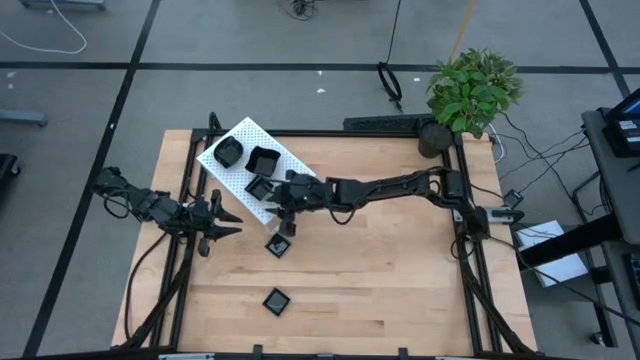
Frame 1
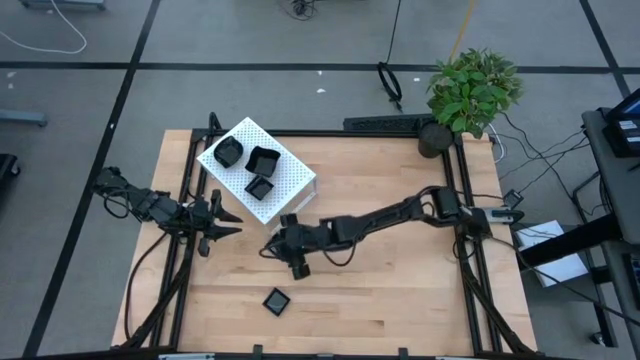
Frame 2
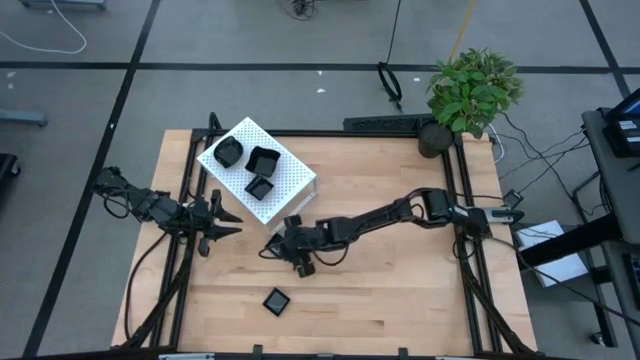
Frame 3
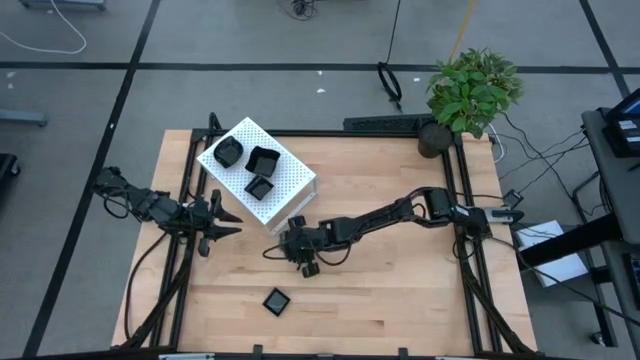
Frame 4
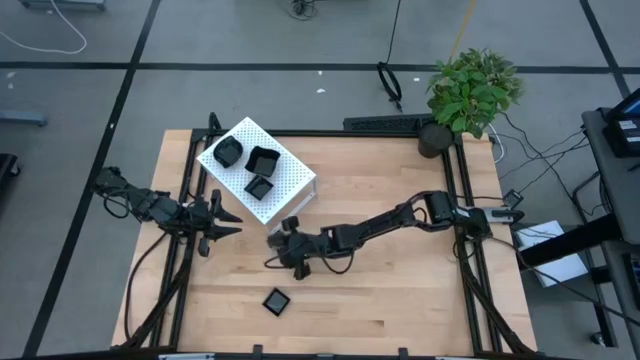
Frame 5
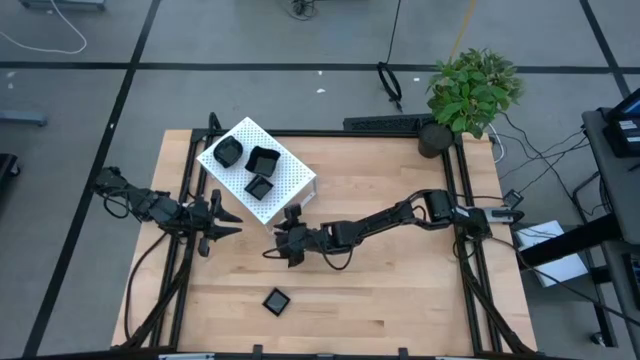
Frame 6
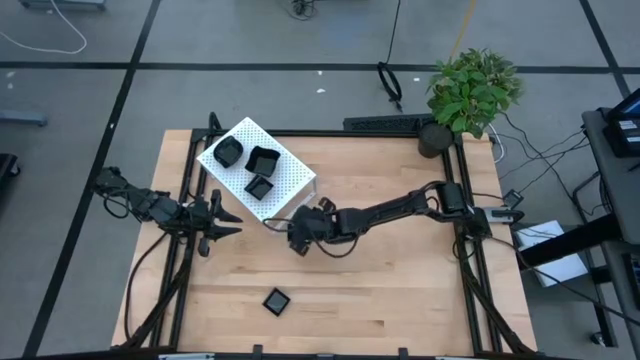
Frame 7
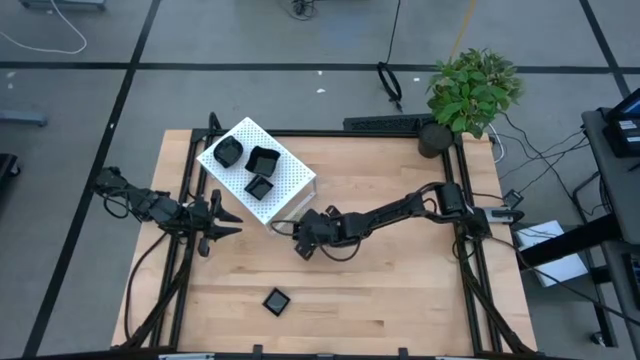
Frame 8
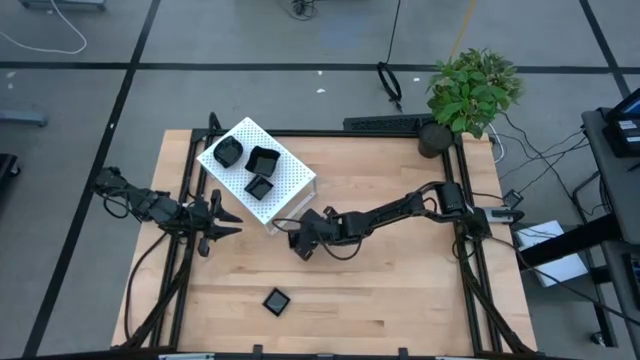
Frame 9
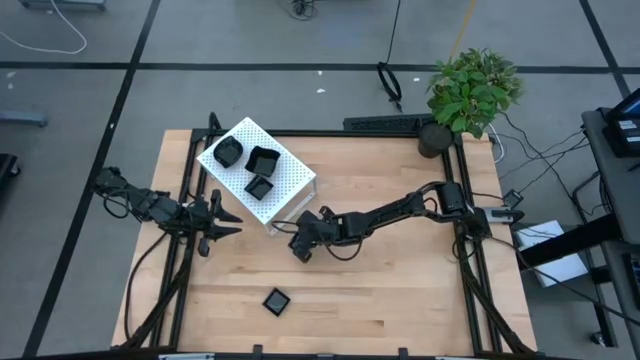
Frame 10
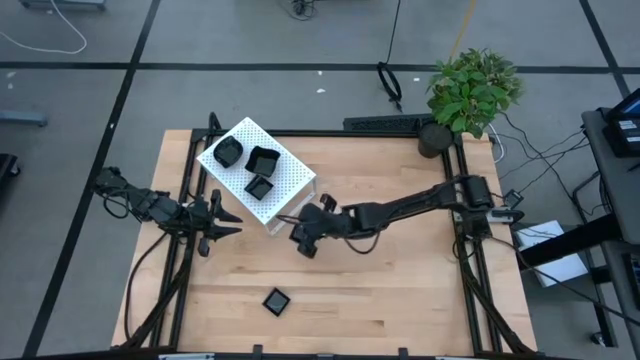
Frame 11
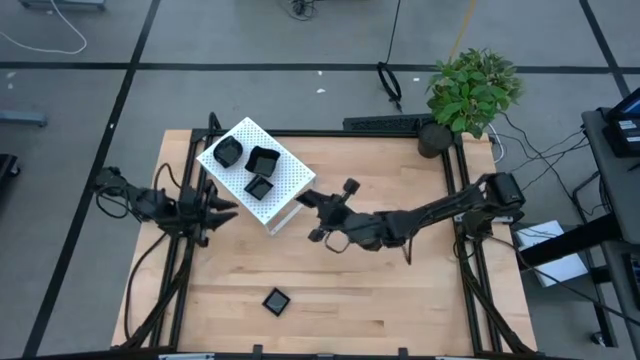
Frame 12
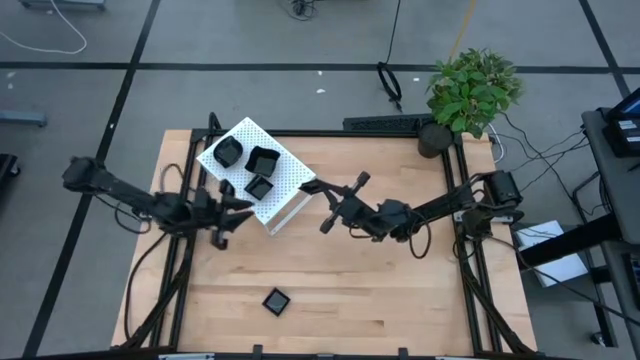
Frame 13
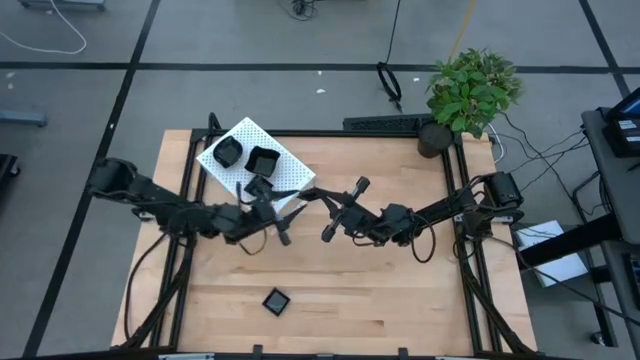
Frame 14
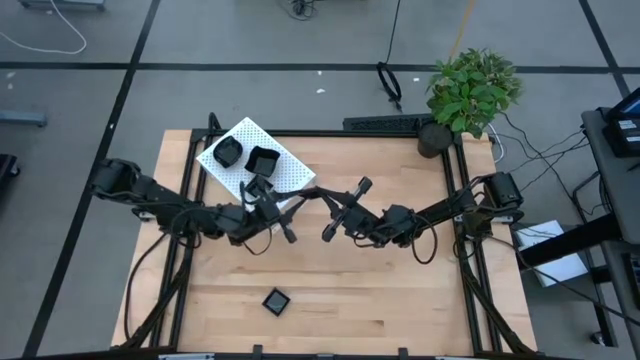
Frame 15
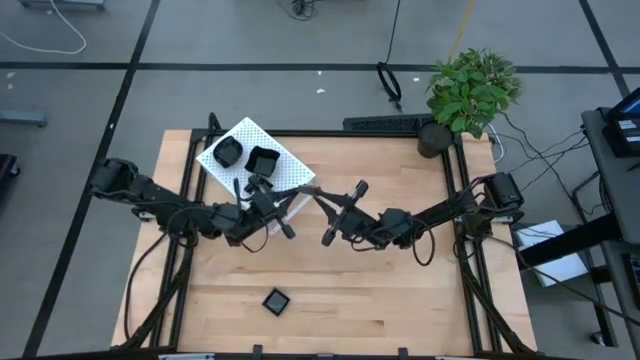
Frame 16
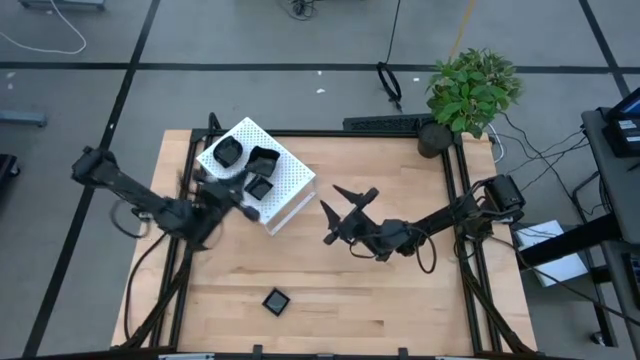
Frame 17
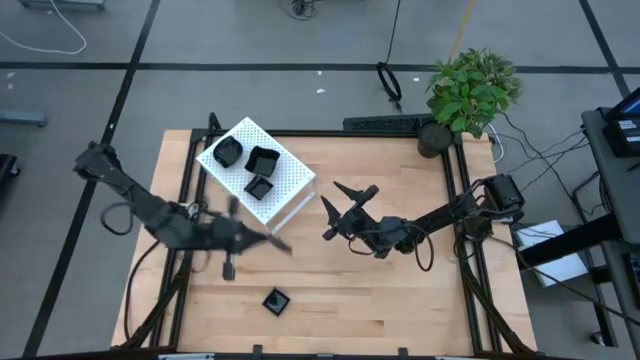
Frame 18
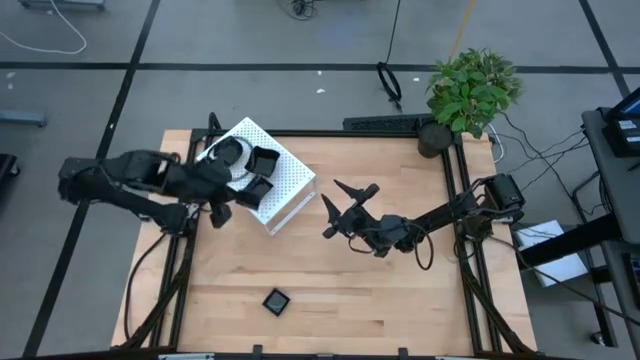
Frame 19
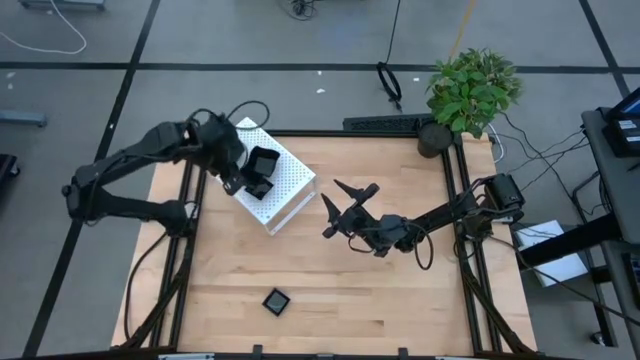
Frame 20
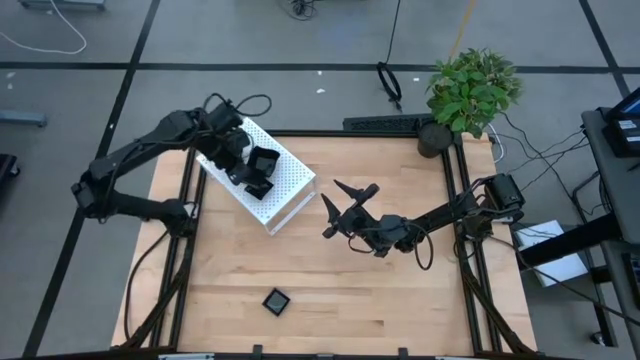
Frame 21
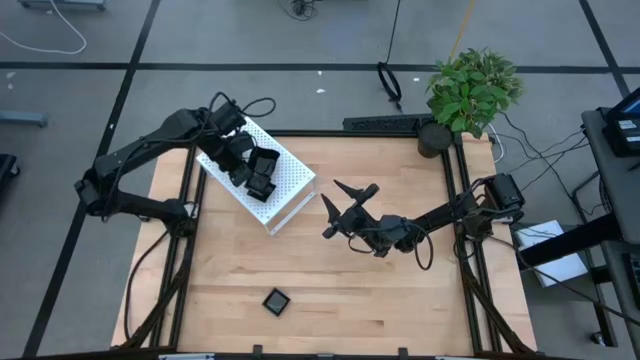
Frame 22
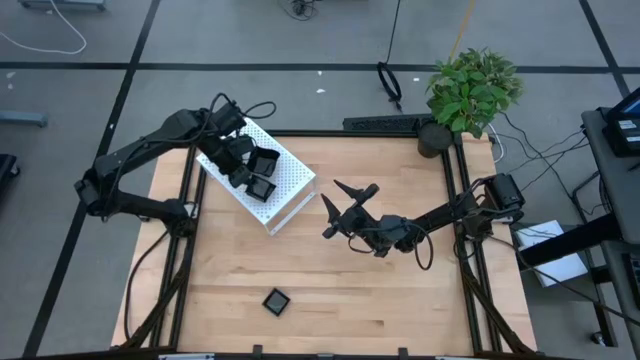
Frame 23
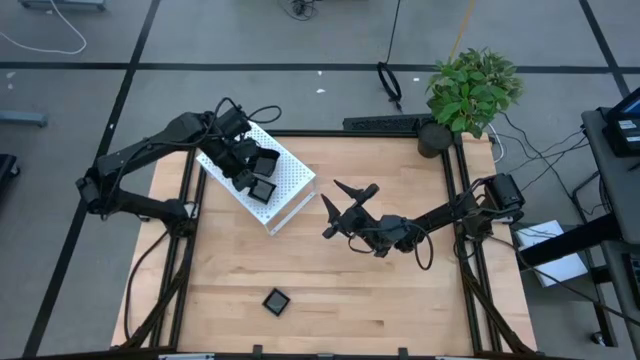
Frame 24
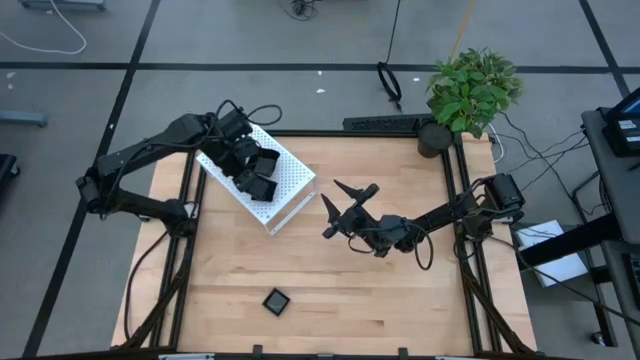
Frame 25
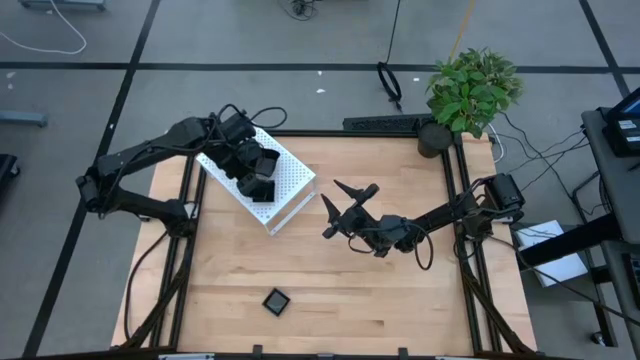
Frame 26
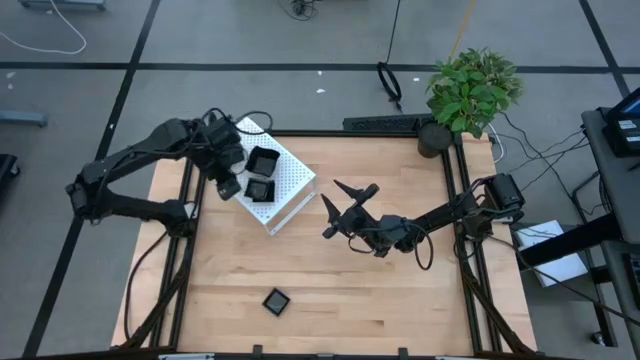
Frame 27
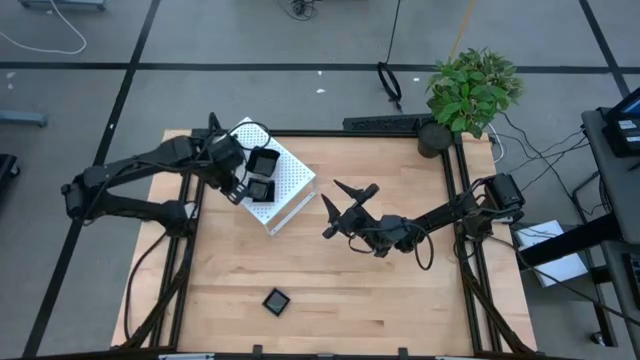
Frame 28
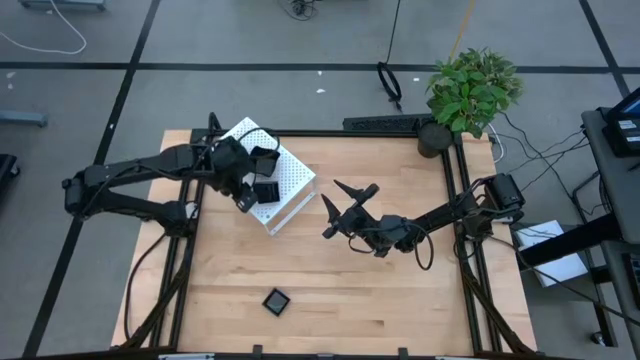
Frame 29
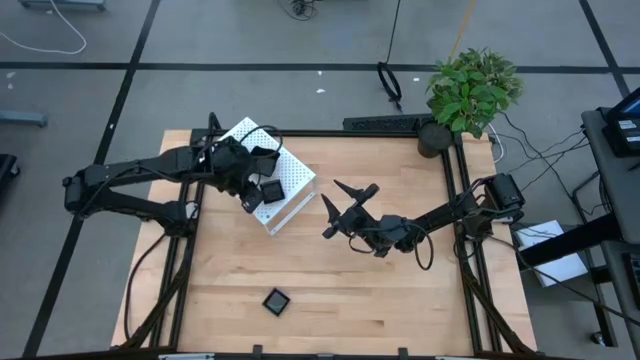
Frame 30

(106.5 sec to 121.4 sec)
Task: Pick & Place Mini shaped plates
Stack the black square plate on top of the black square plate on the shelf

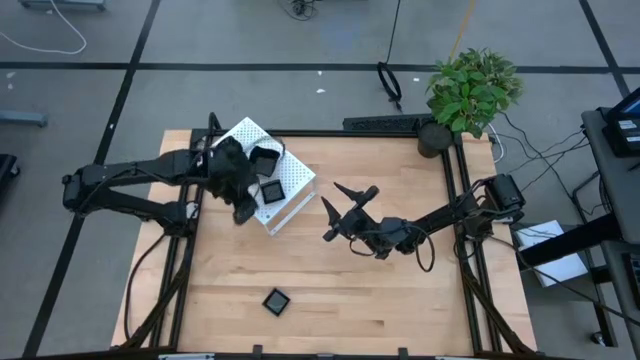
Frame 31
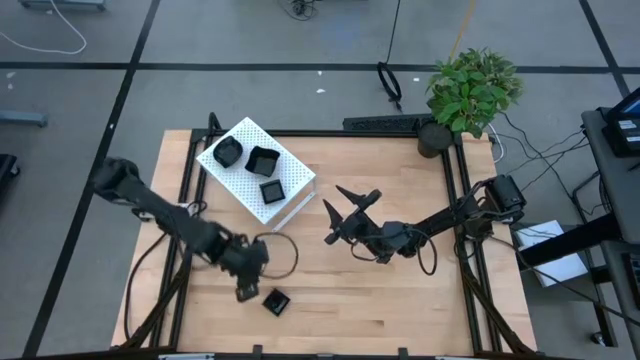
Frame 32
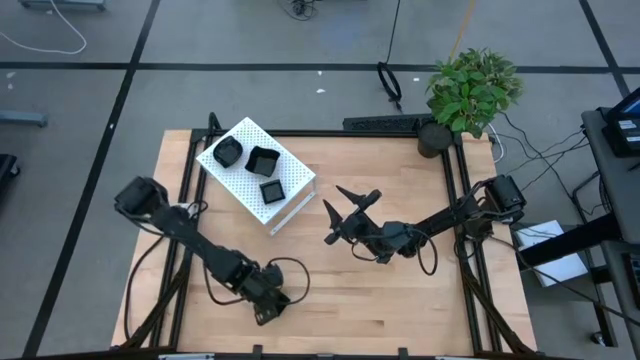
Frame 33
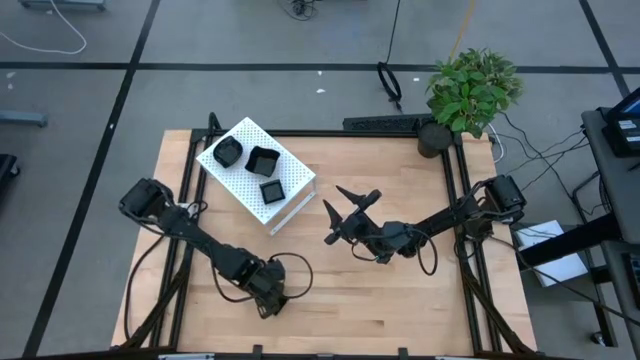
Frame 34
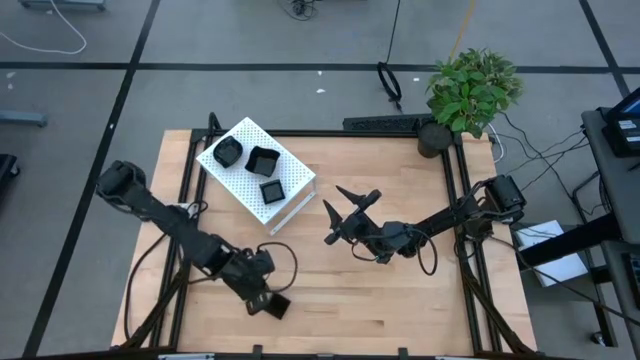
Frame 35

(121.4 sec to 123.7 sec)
Stack the black square plate on top of the black square plate on the shelf

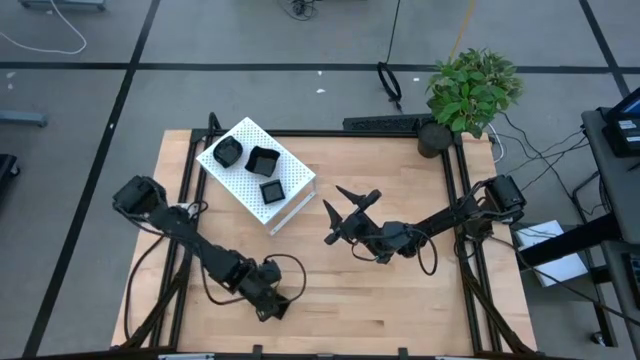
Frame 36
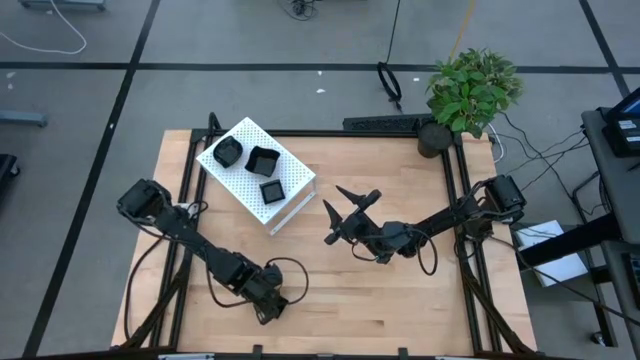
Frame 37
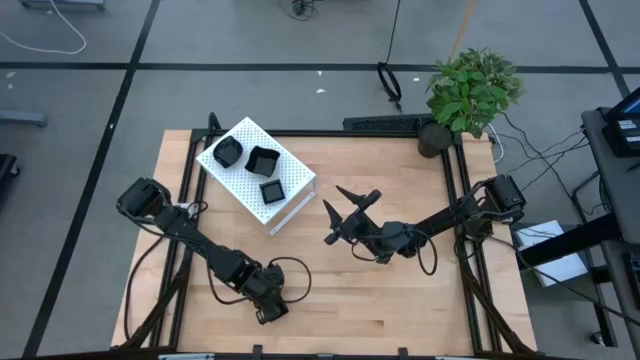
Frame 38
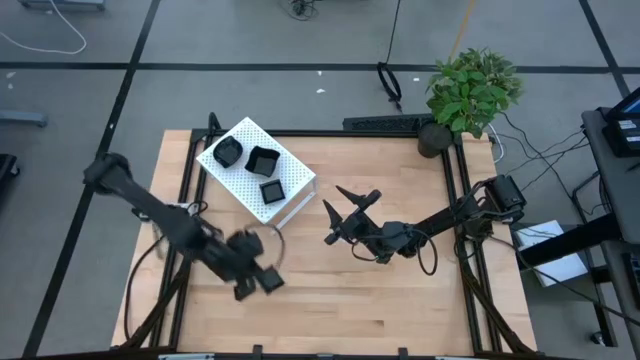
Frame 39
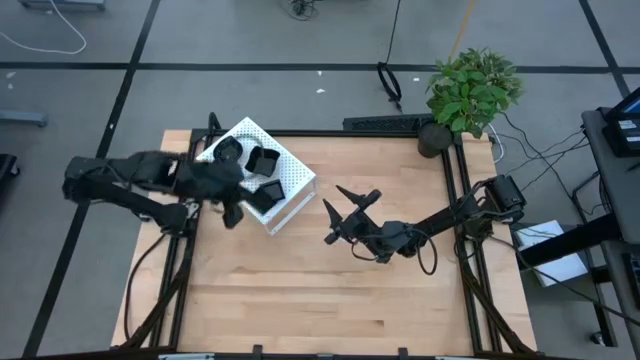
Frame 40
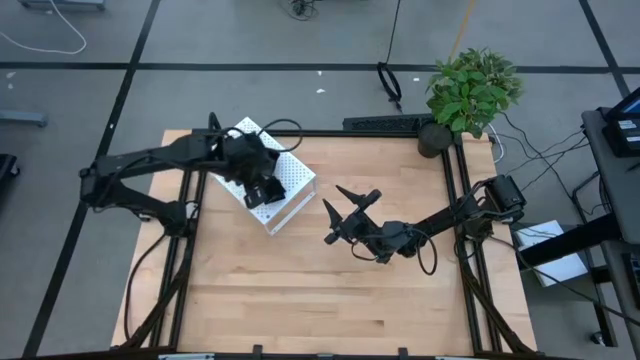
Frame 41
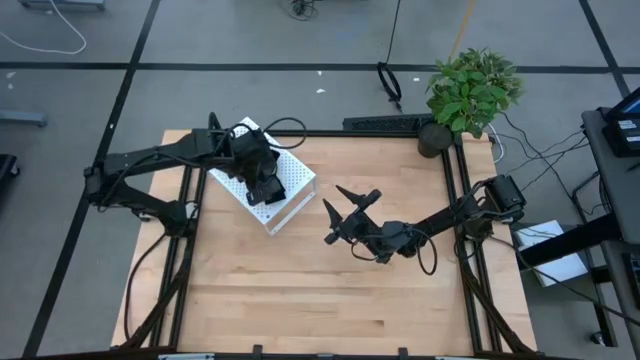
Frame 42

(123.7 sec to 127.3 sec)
Stack the black square plate on top of the black square plate on the shelf
